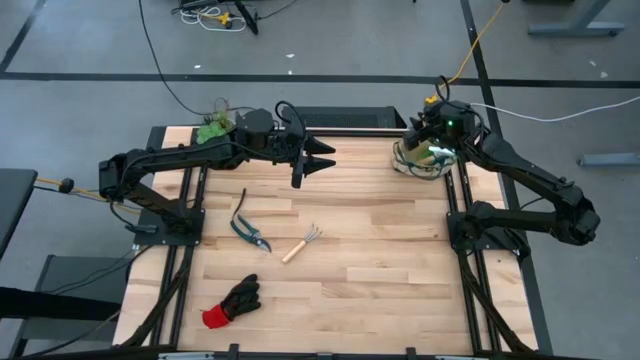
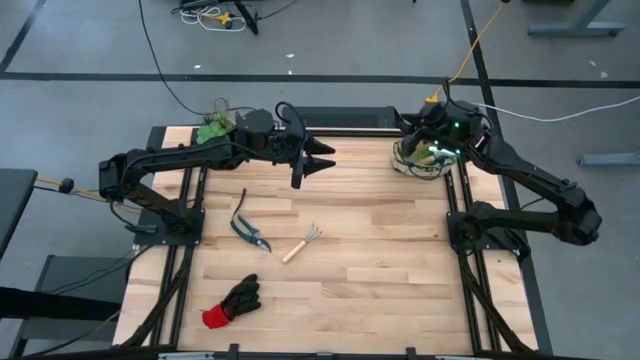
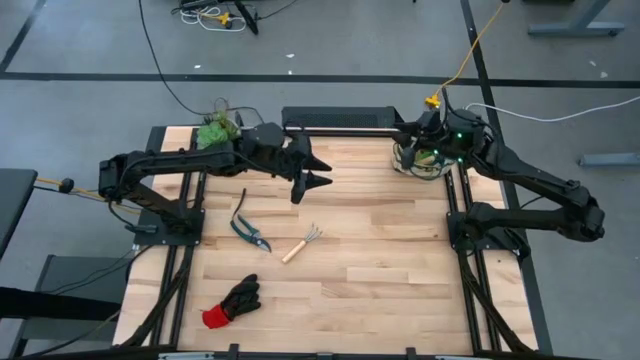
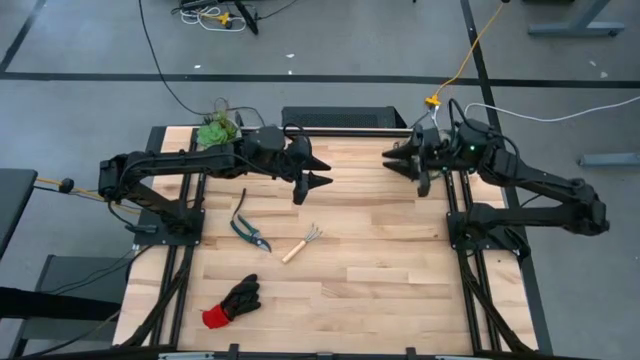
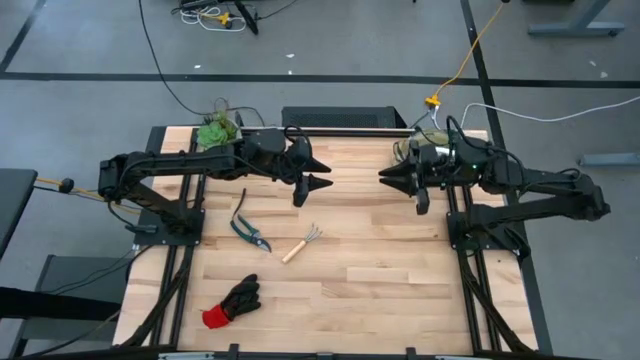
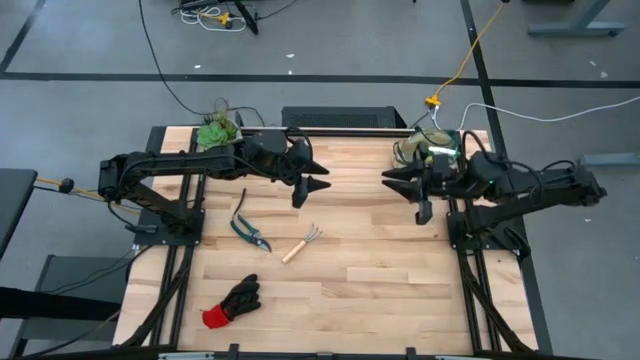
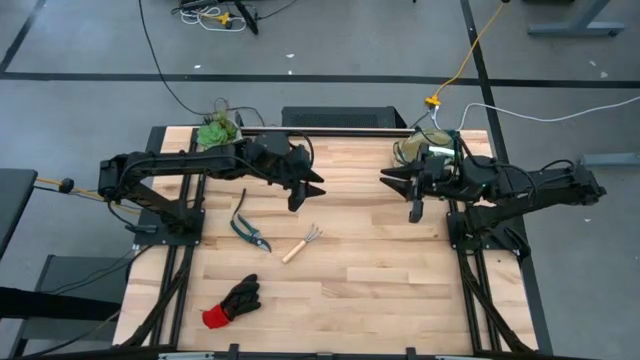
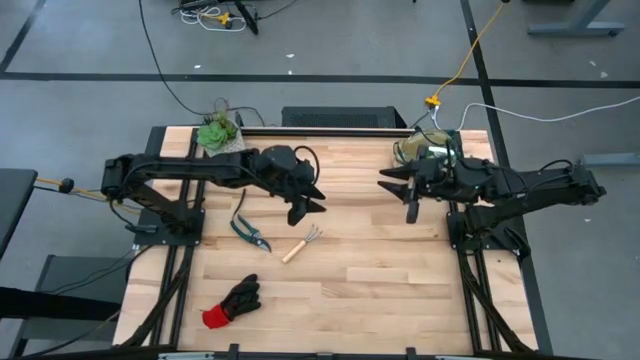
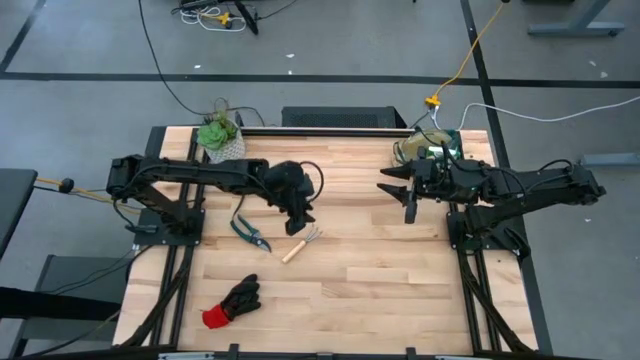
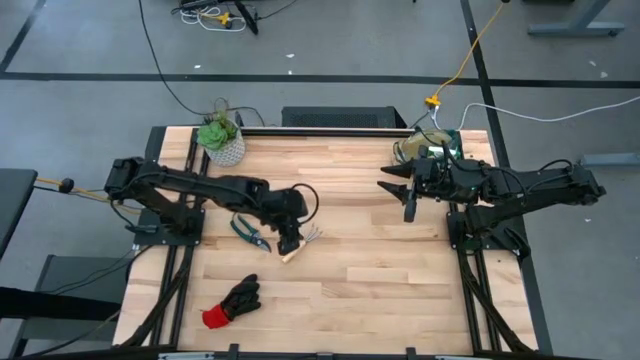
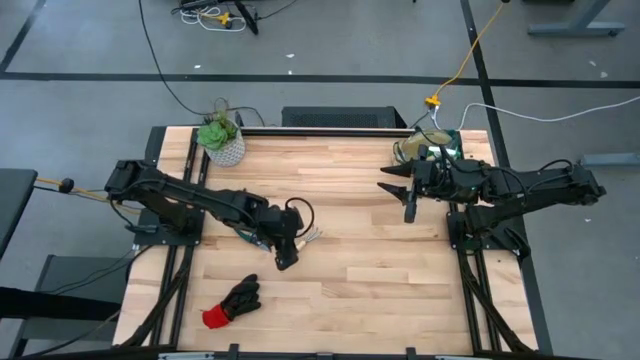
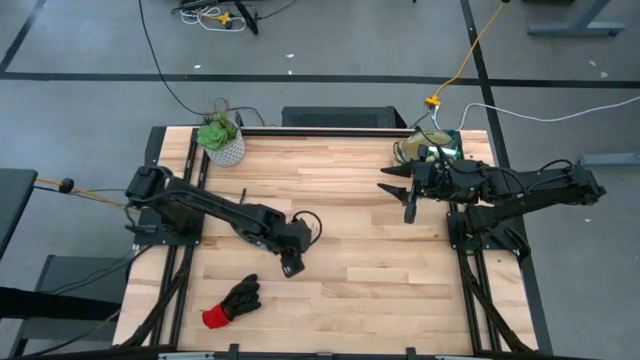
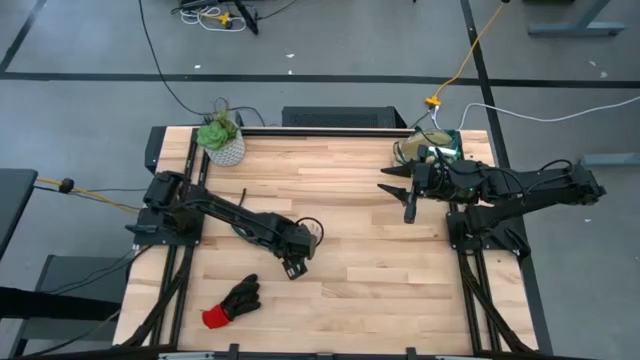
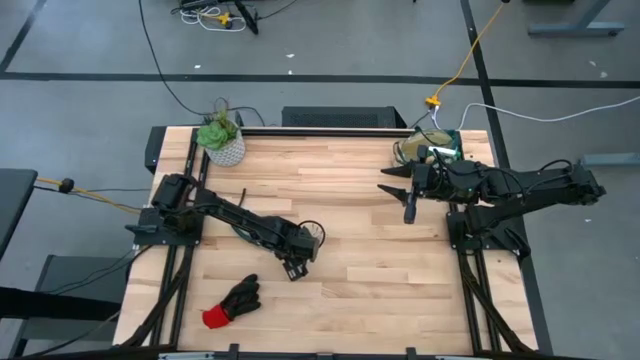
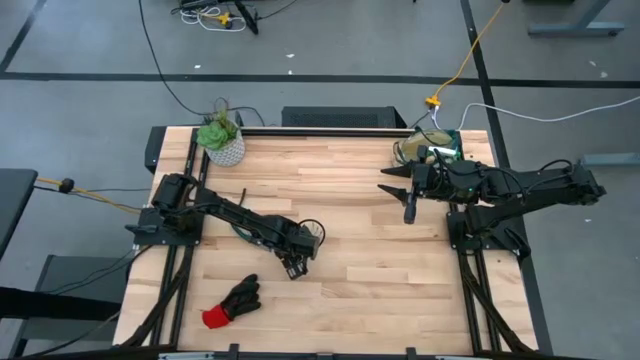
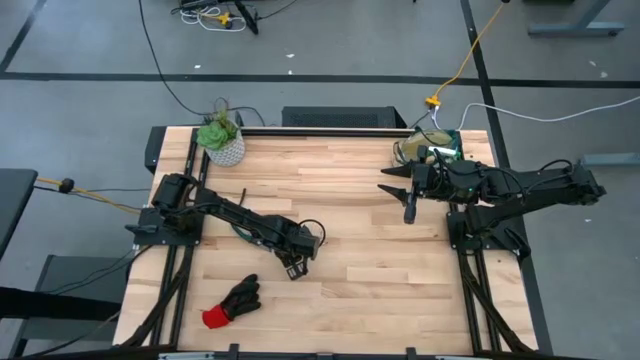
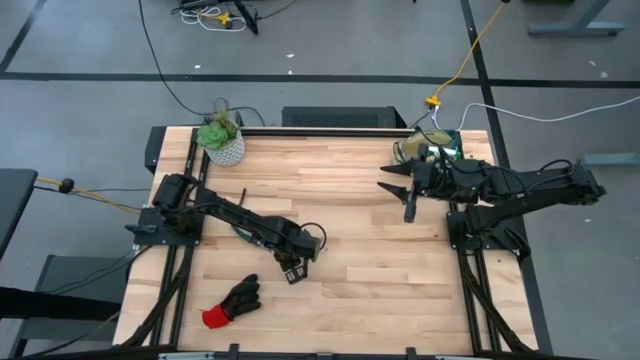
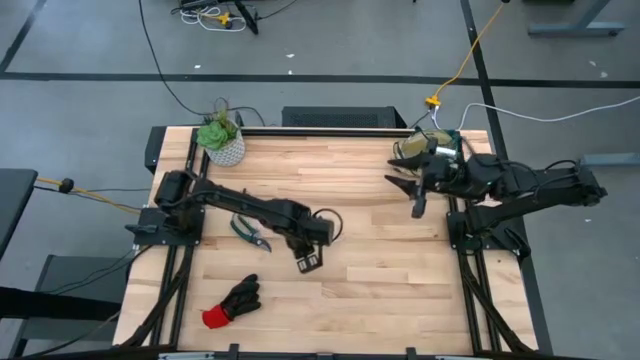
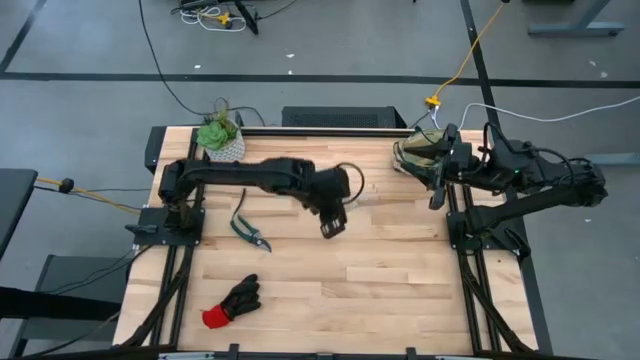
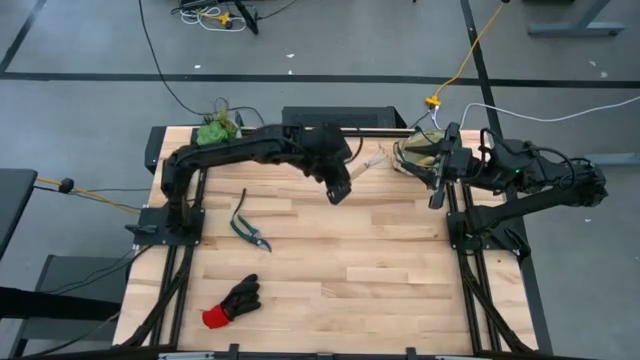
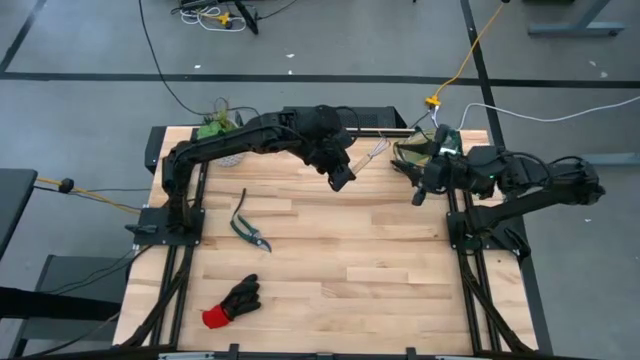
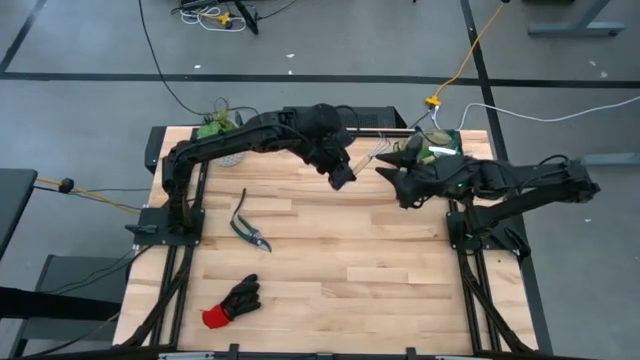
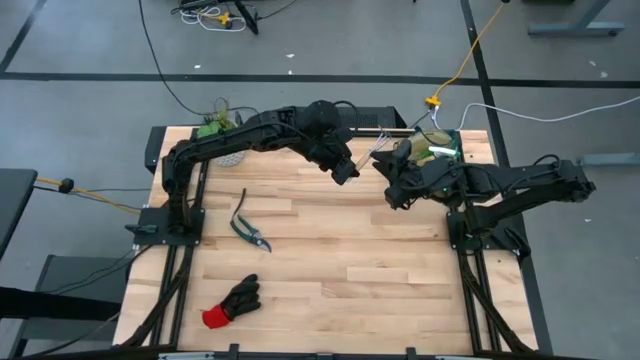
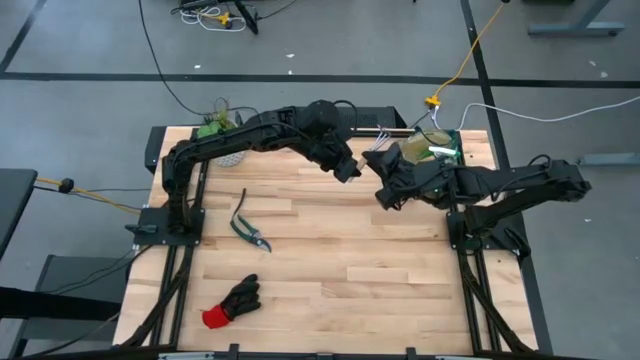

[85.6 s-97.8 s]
Task: Pick & Place Garden tools in Gardening bag
Put the brown hand rake into the gardening bag

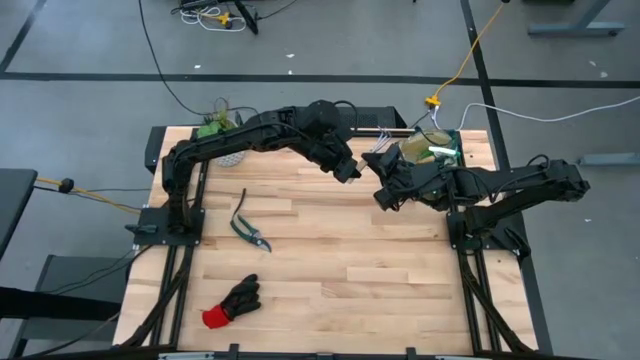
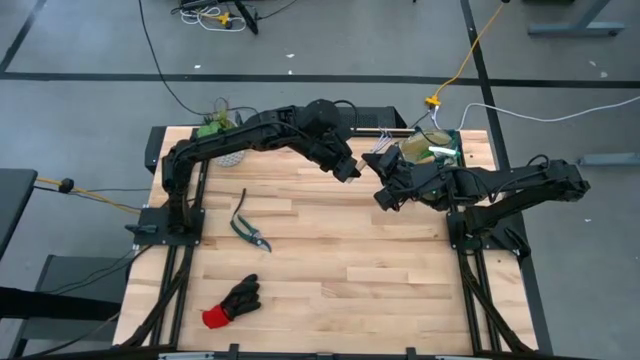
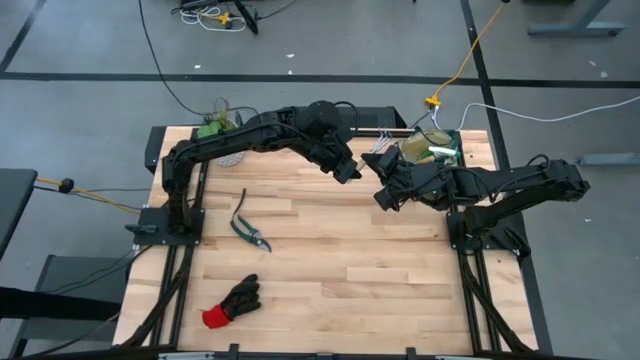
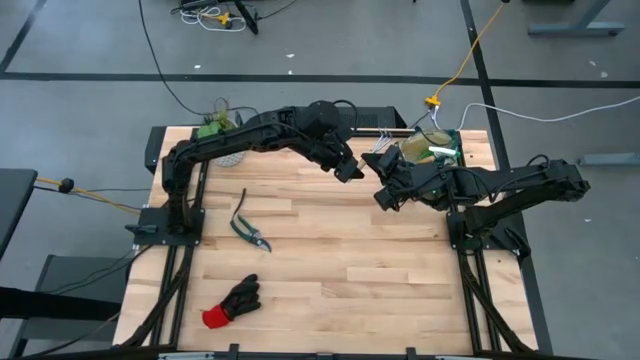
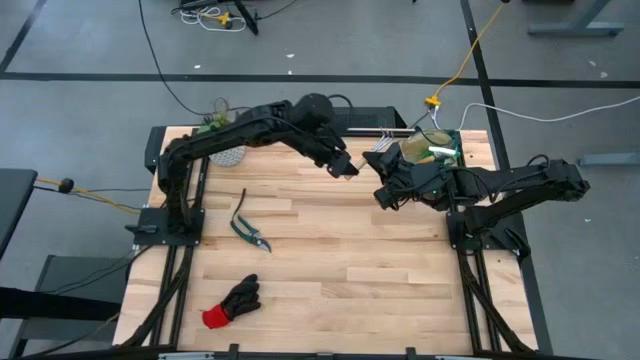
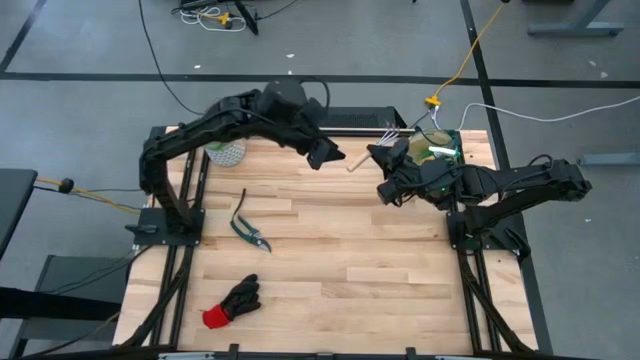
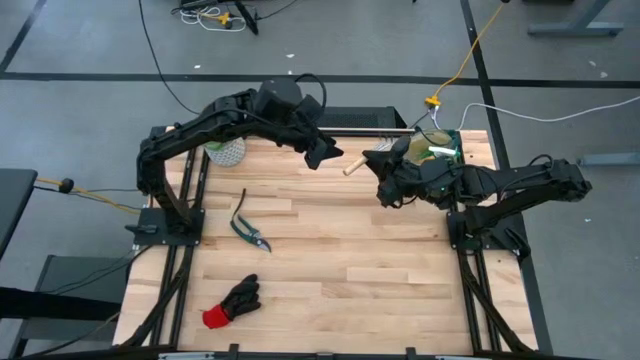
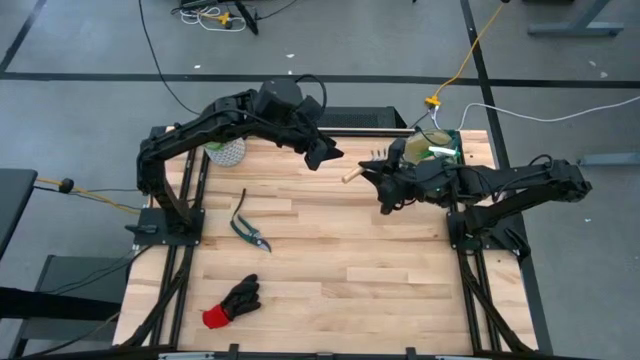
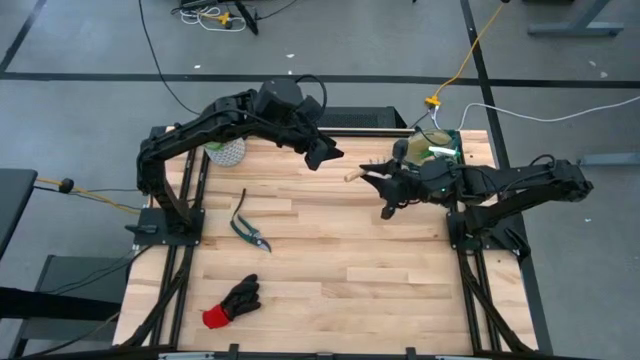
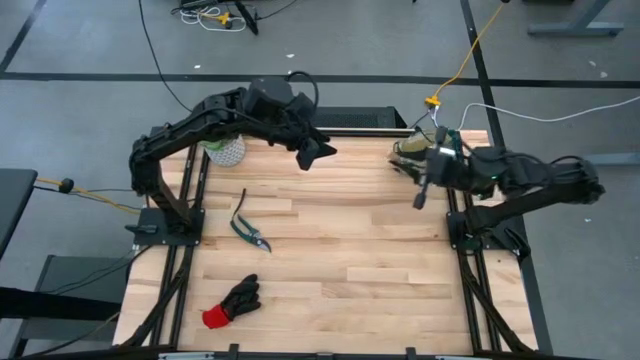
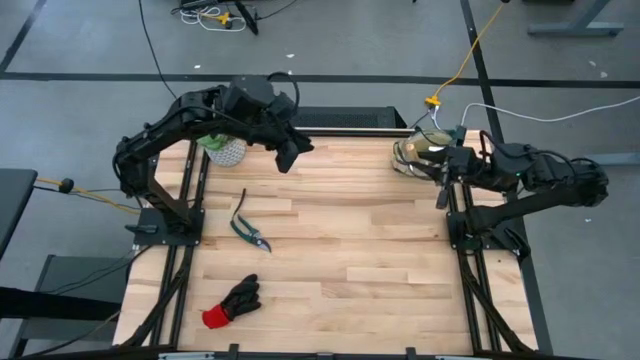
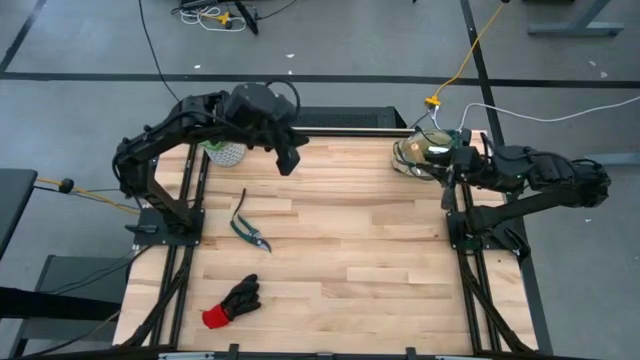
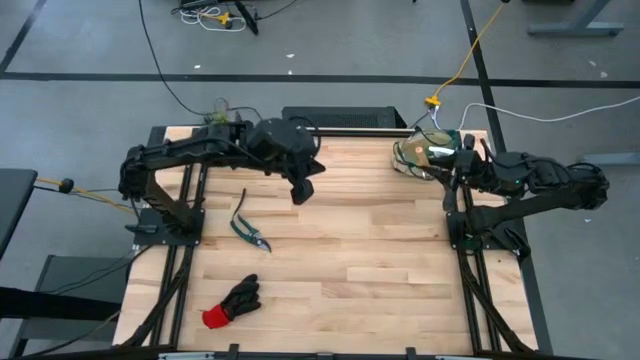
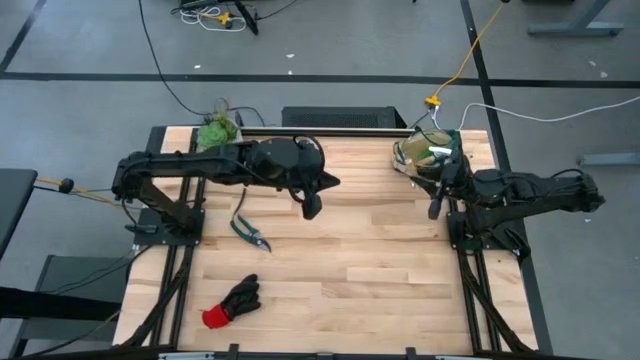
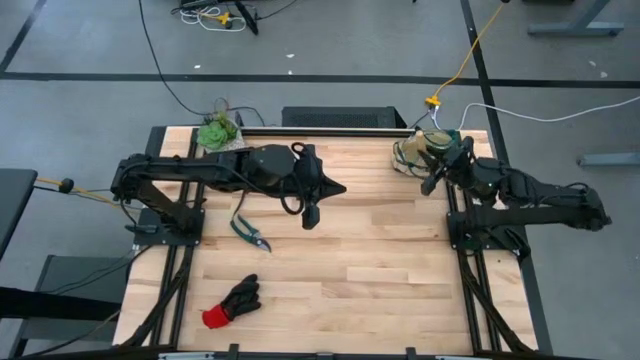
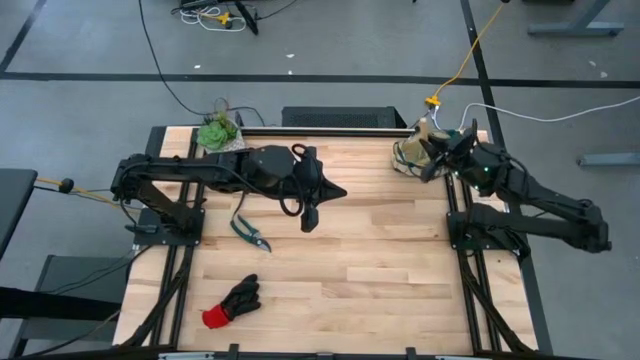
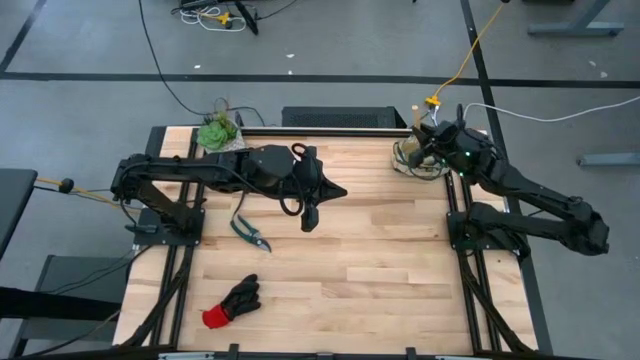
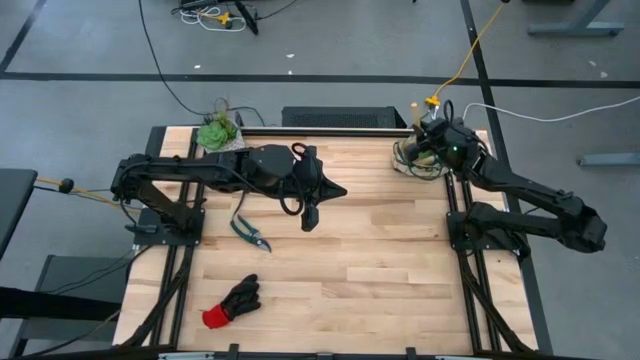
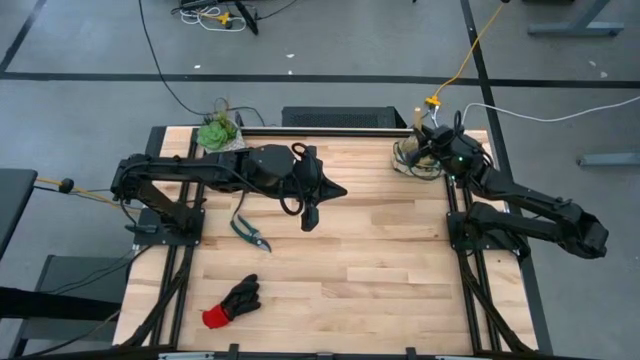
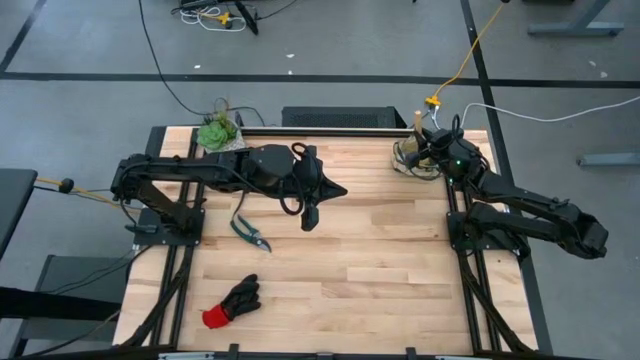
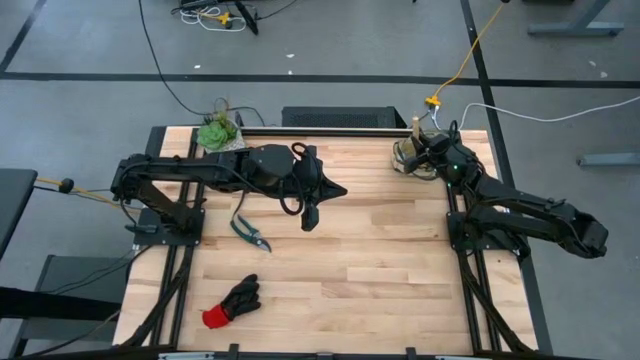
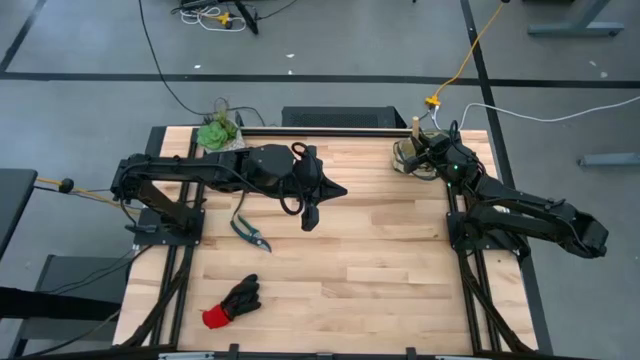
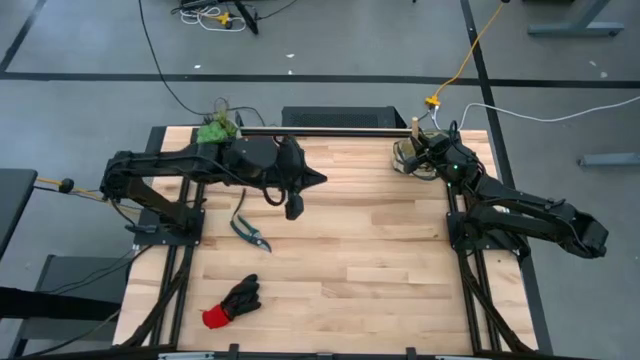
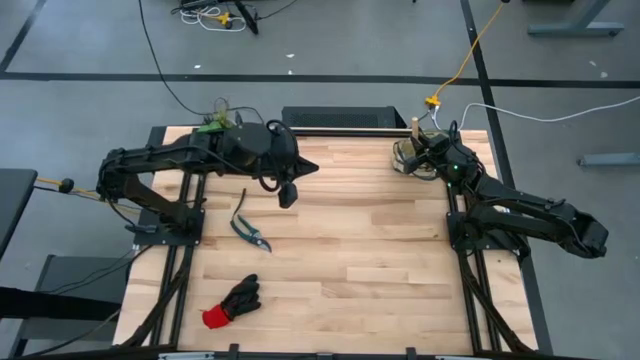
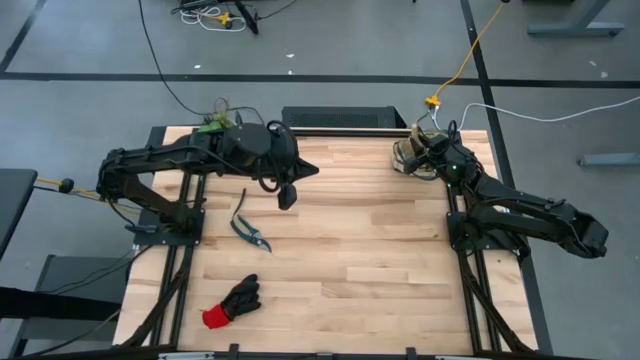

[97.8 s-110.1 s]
Put the brown hand rake into the gardening bag
